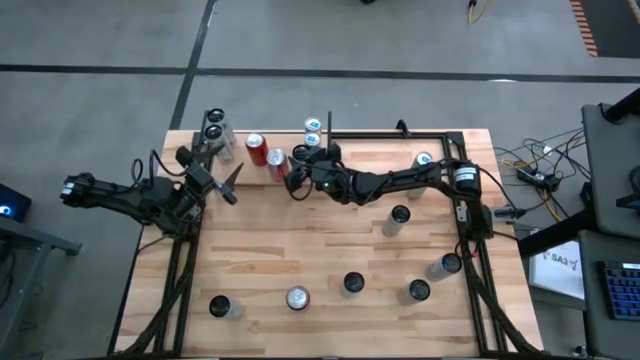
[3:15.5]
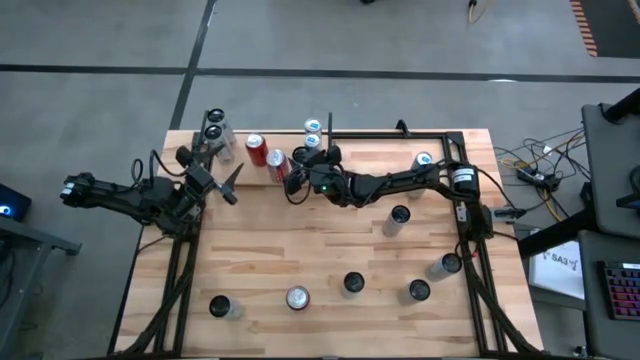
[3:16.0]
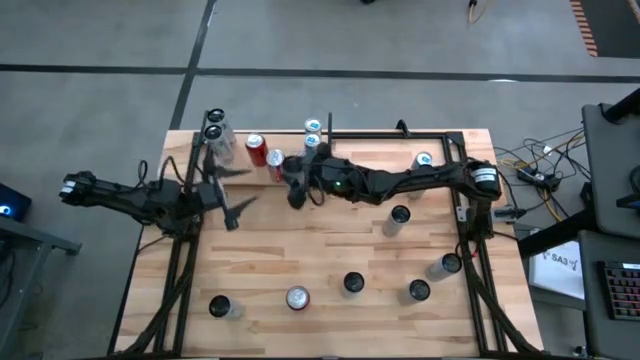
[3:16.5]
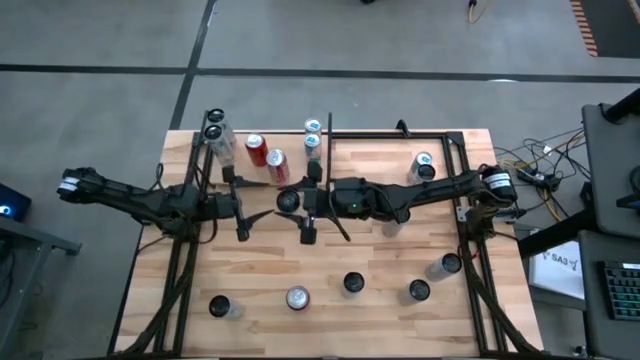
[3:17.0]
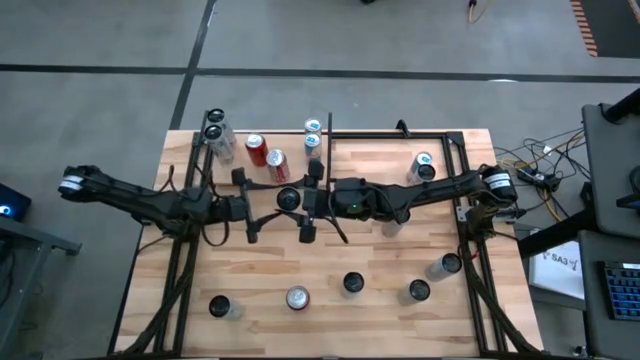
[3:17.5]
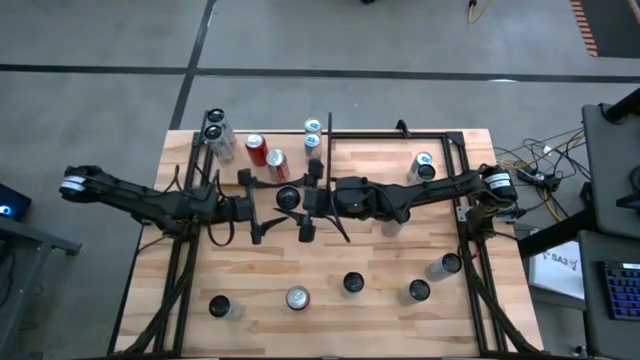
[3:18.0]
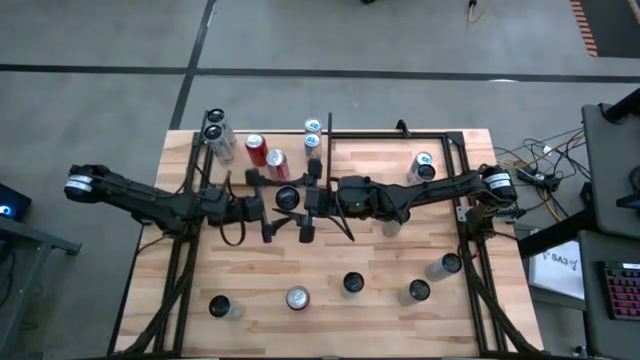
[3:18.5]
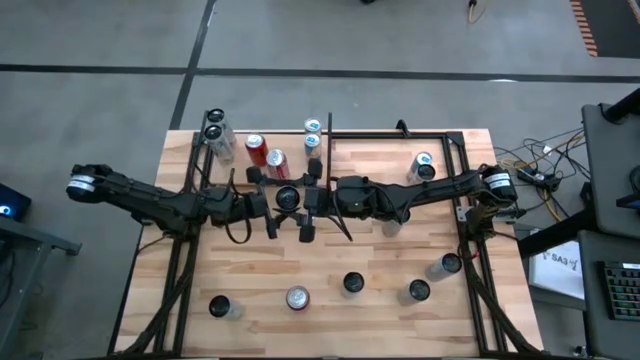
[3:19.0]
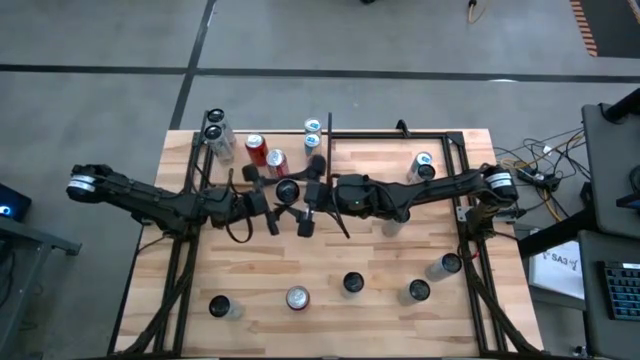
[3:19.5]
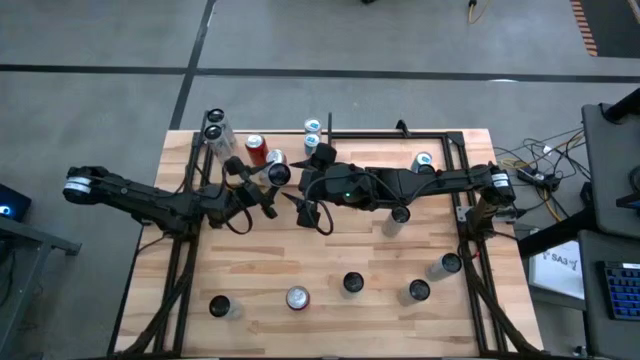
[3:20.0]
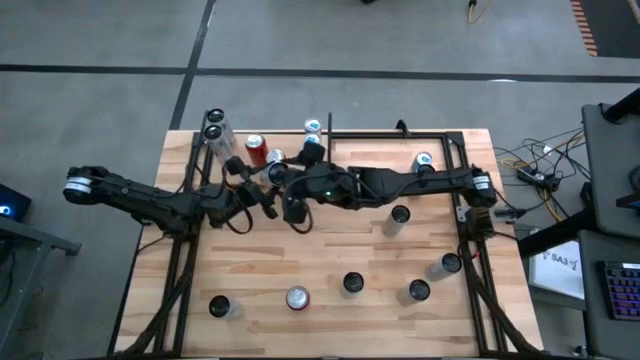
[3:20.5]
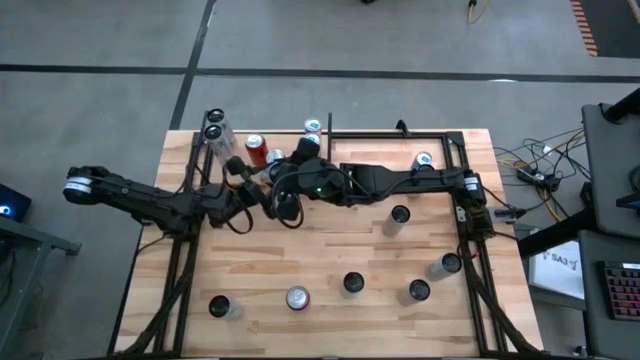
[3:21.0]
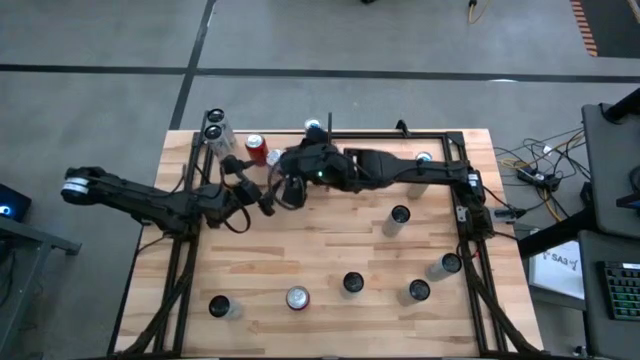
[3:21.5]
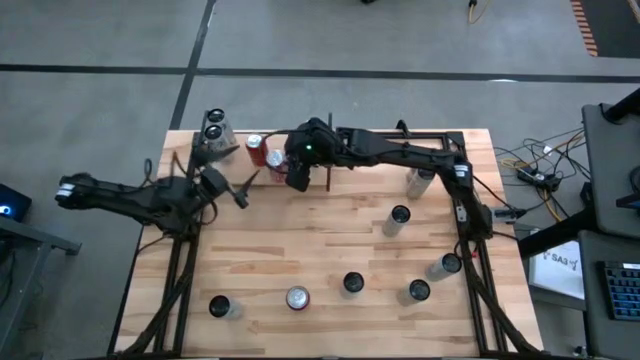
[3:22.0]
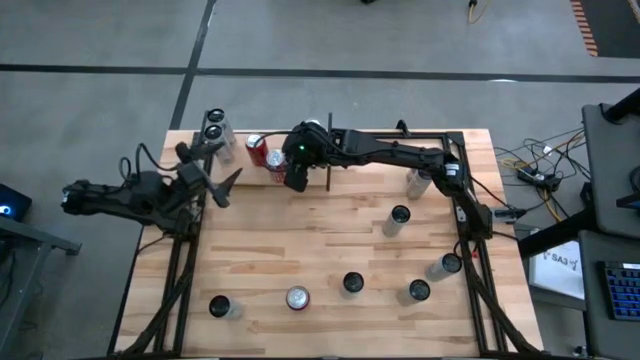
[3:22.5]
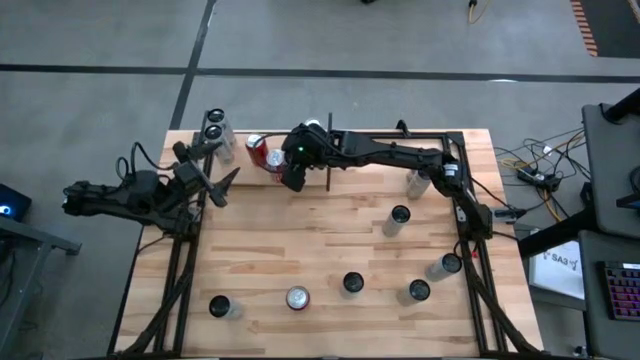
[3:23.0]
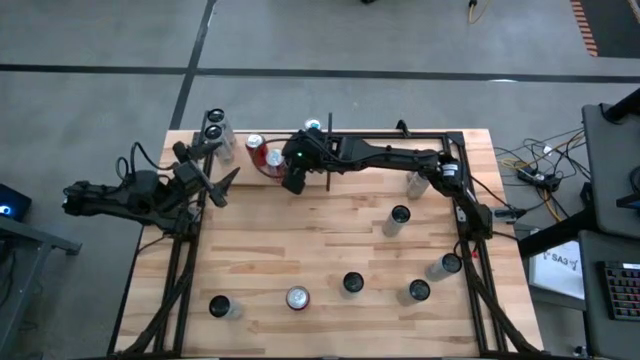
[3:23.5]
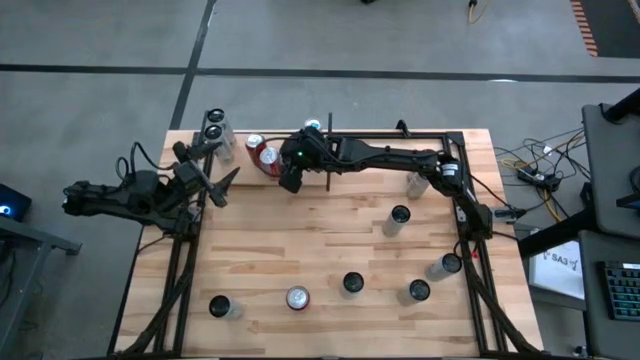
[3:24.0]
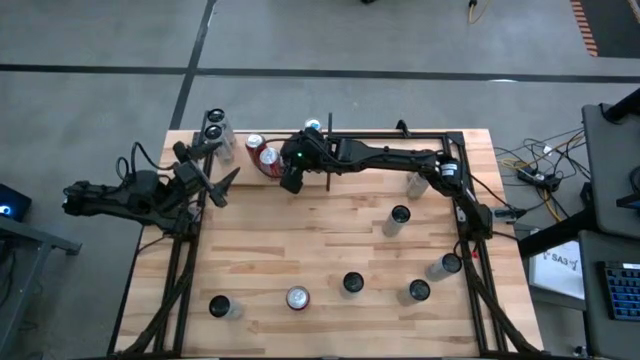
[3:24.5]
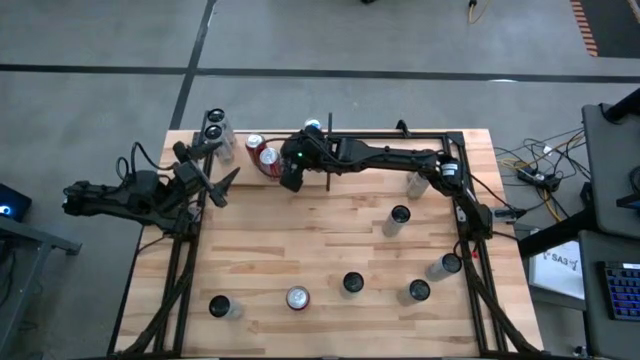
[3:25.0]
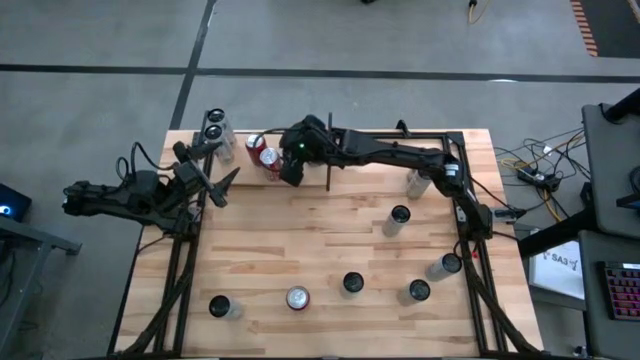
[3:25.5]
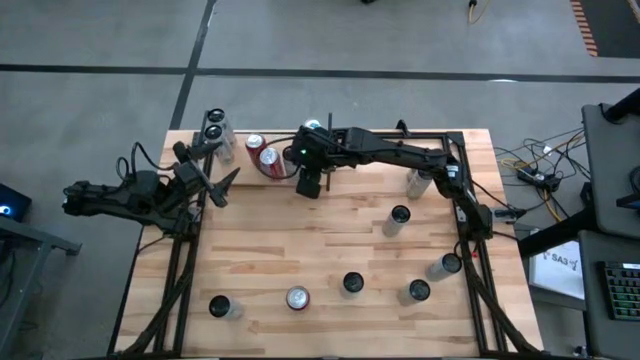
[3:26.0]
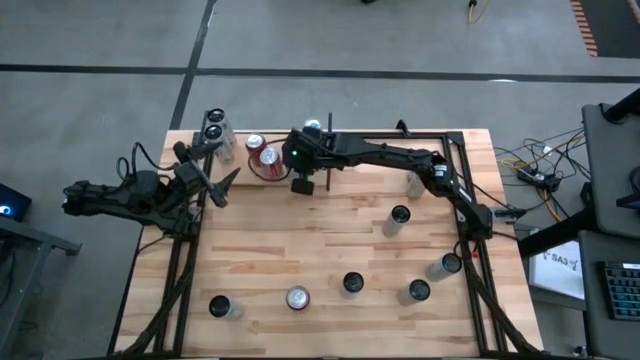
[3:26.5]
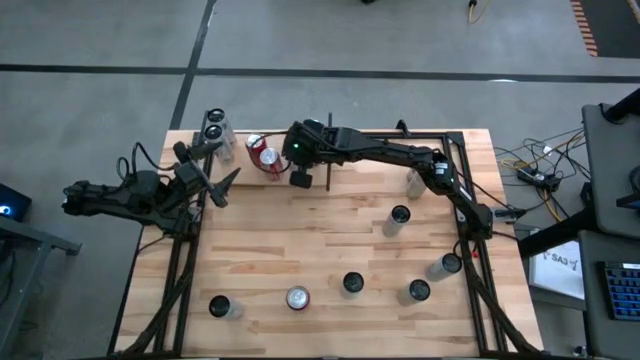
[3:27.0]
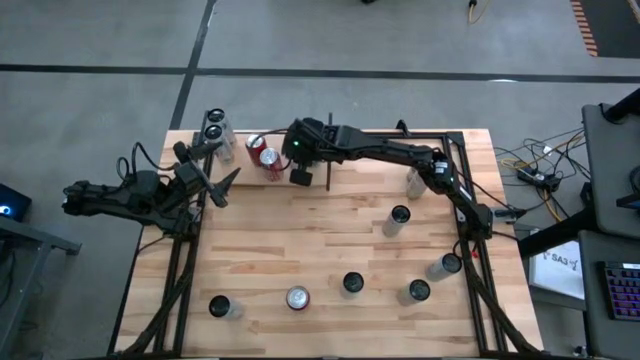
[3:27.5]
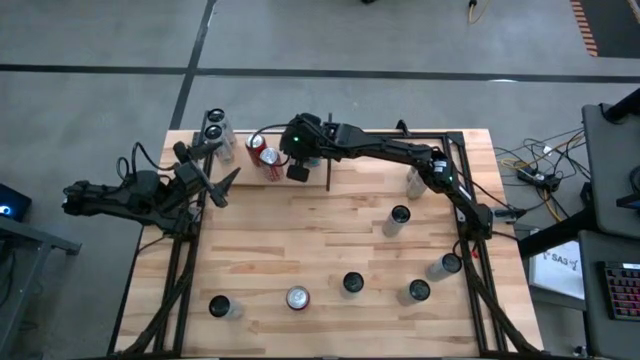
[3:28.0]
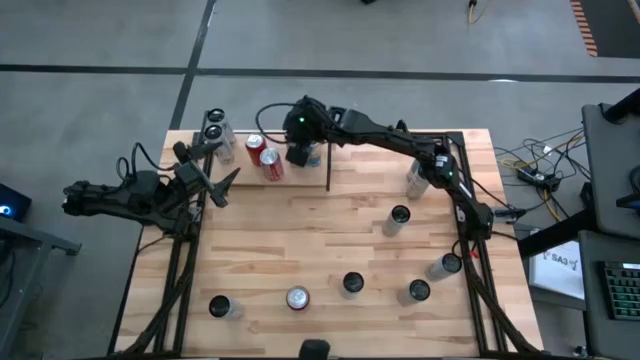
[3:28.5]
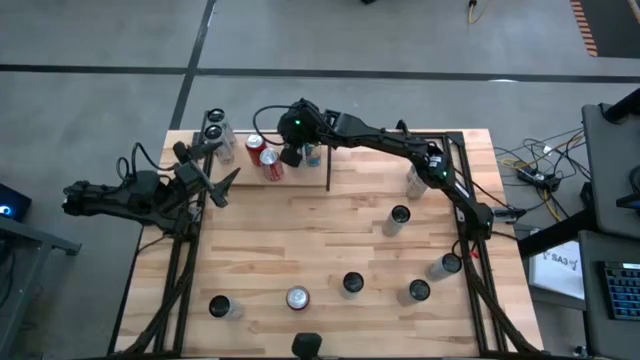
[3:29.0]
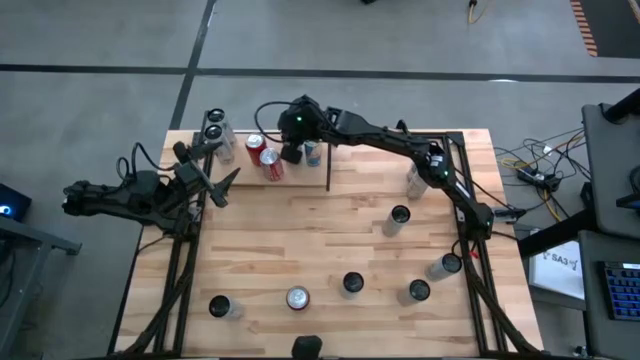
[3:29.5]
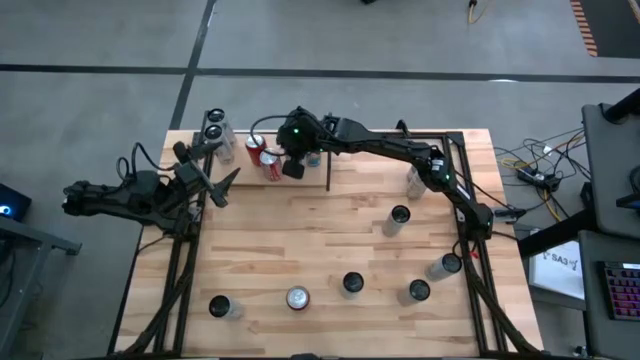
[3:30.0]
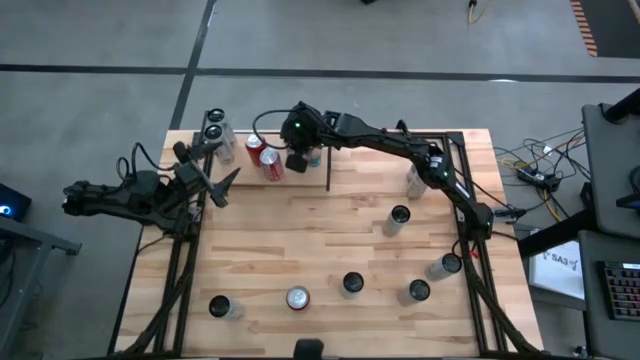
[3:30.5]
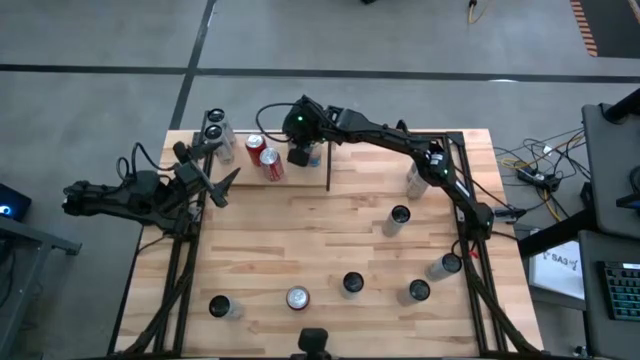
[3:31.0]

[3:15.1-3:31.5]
Task: Place canned beverage on shelf
Put the top left white and blue soda can on the shelf

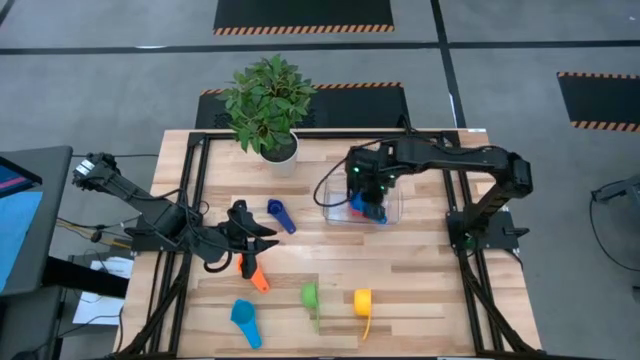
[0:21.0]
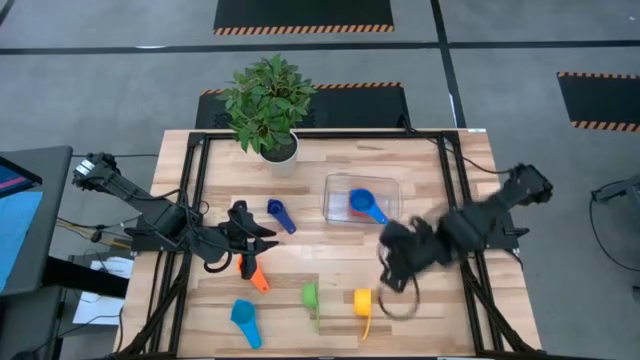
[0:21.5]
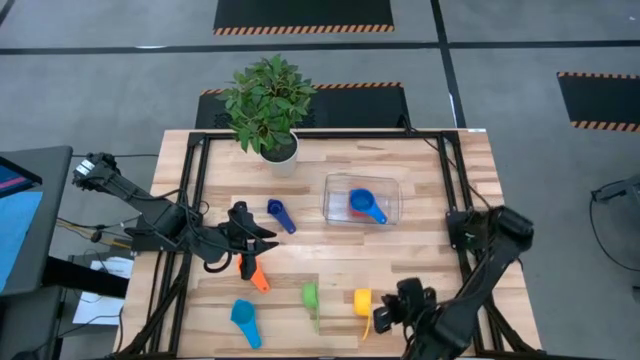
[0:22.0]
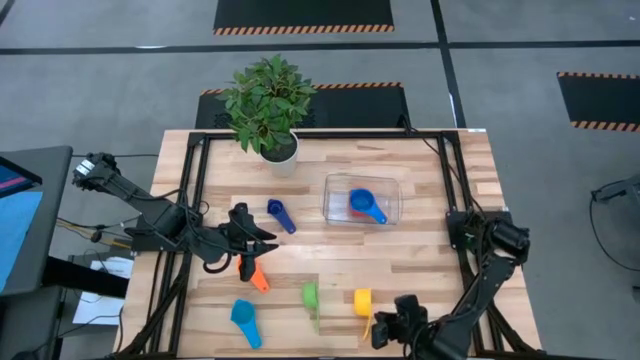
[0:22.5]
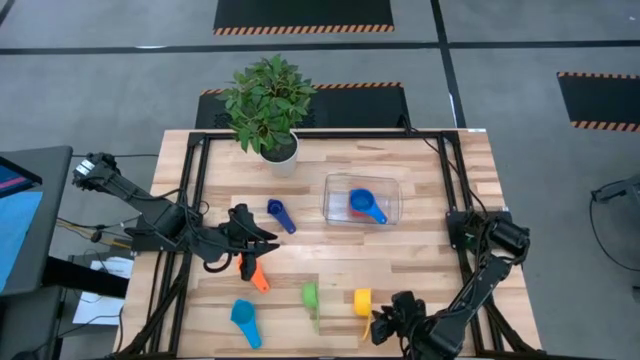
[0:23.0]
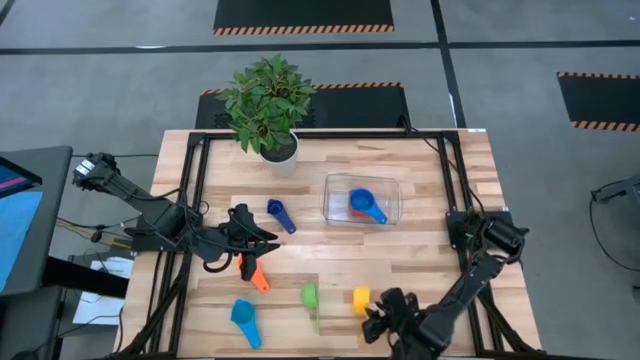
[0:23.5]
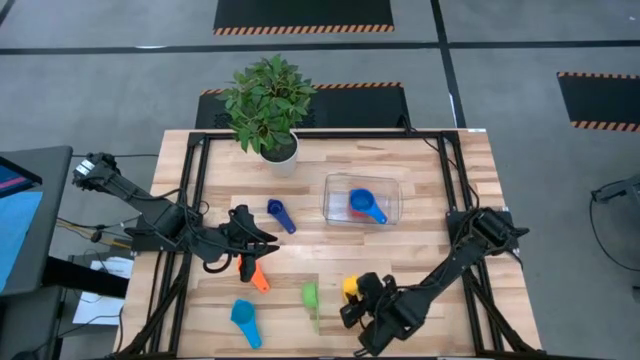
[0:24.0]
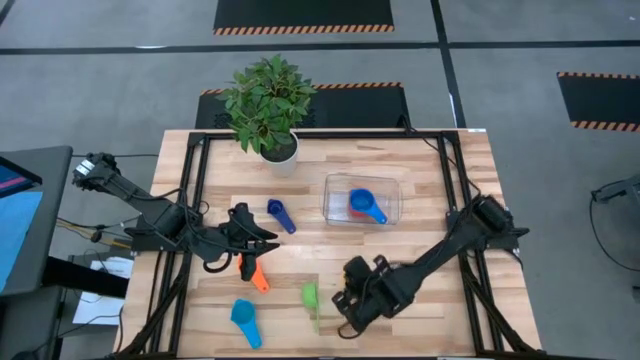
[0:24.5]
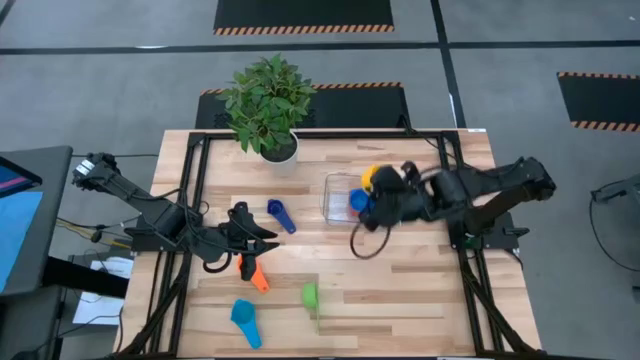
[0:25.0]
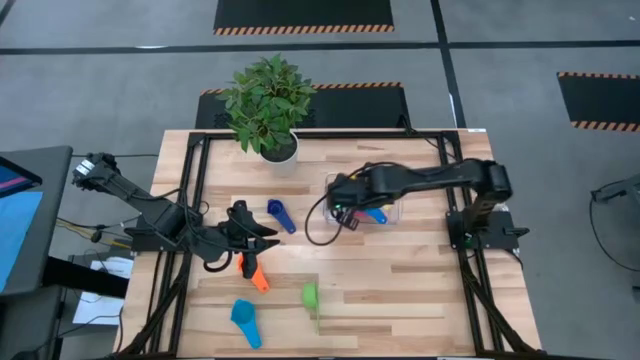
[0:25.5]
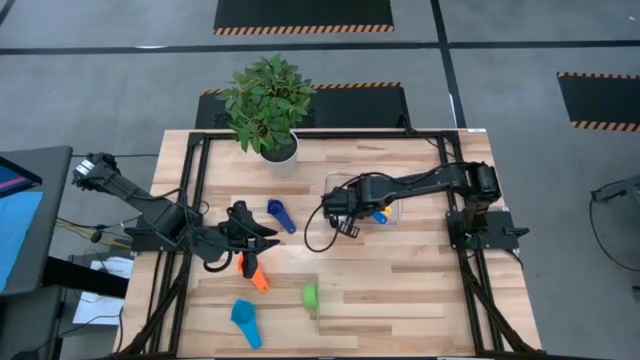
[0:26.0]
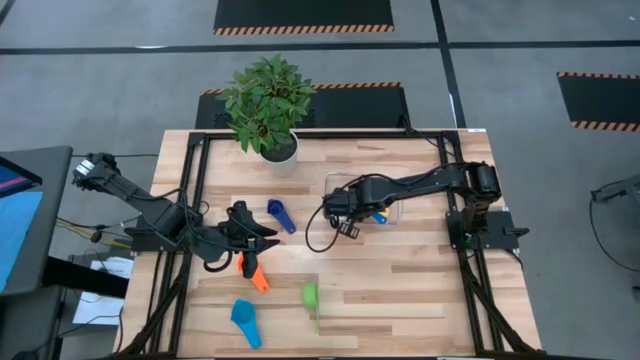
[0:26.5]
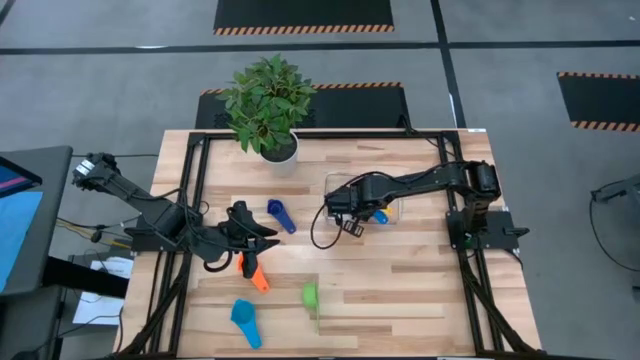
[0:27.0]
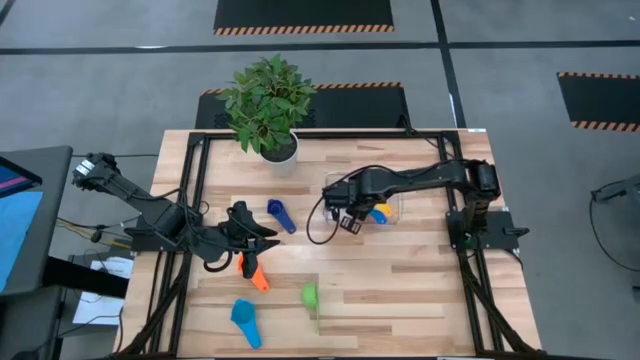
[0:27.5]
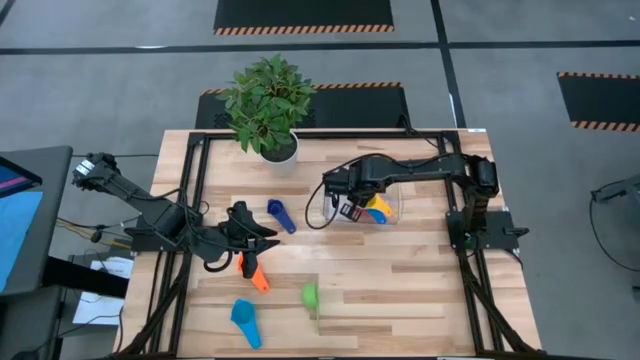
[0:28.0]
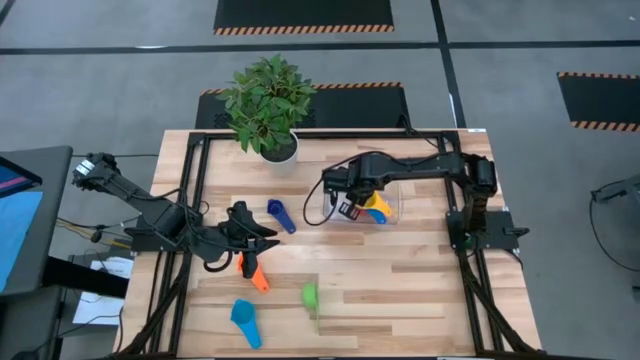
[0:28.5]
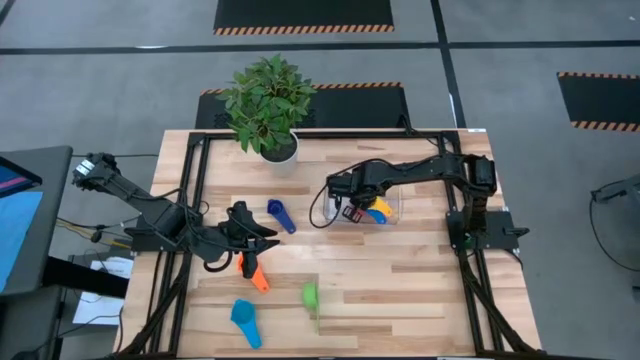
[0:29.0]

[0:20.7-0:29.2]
Task: Nest measuring cups in basket
Stack the yellow measuring cup on top of the blue measuring cup in the transparent bin
